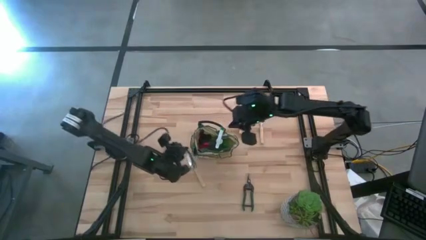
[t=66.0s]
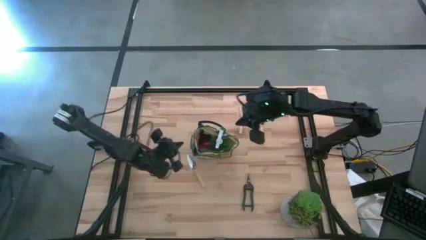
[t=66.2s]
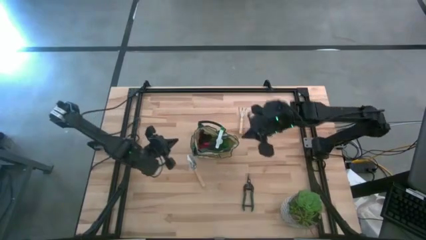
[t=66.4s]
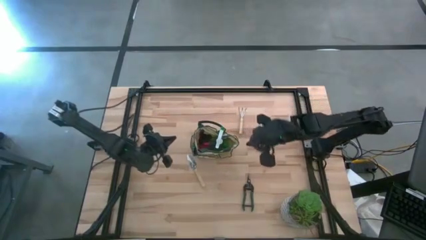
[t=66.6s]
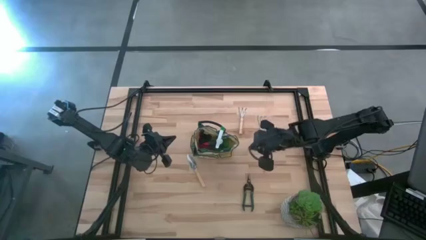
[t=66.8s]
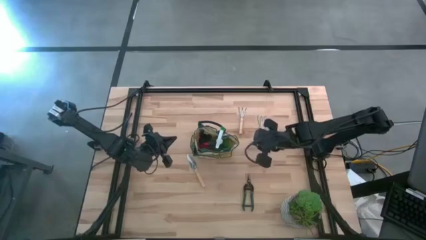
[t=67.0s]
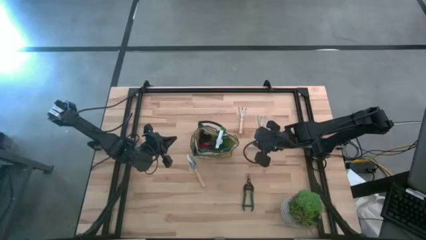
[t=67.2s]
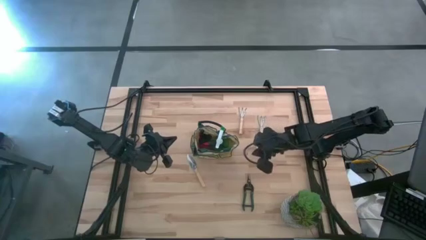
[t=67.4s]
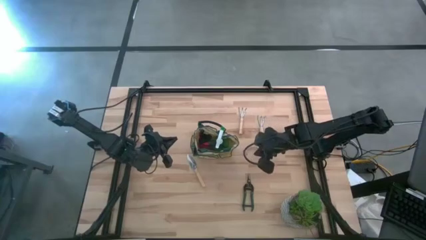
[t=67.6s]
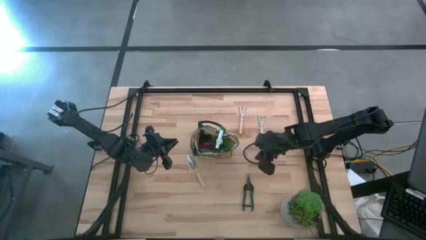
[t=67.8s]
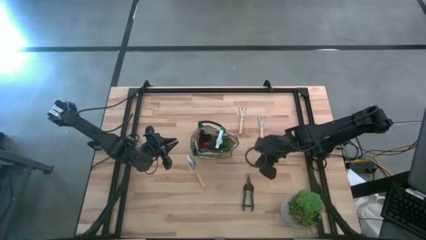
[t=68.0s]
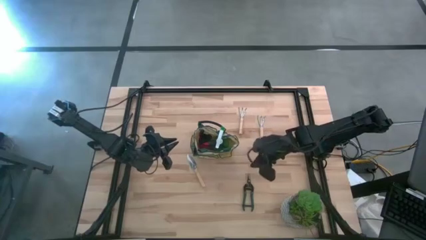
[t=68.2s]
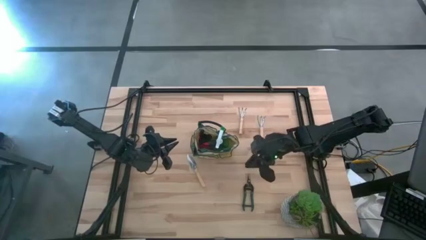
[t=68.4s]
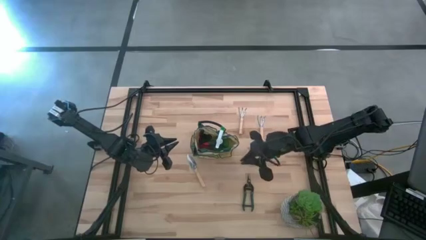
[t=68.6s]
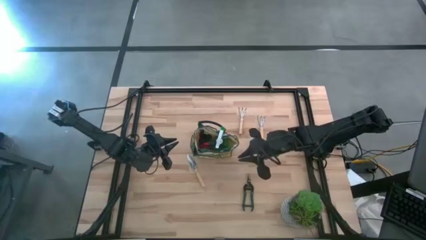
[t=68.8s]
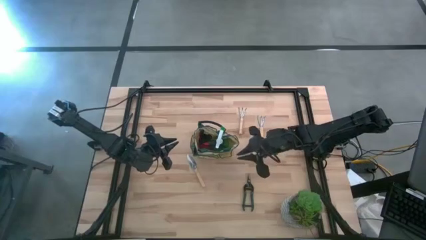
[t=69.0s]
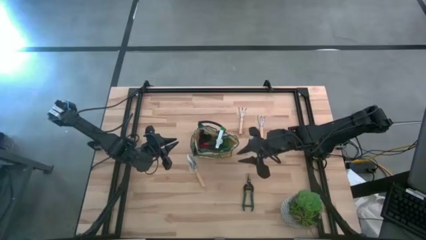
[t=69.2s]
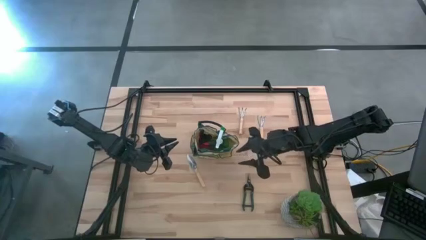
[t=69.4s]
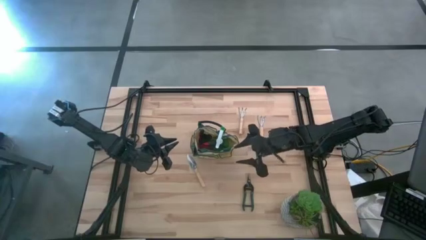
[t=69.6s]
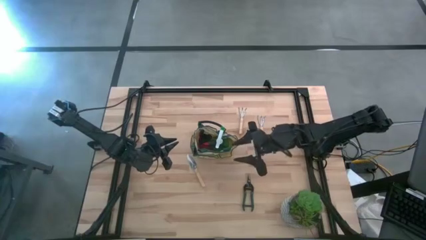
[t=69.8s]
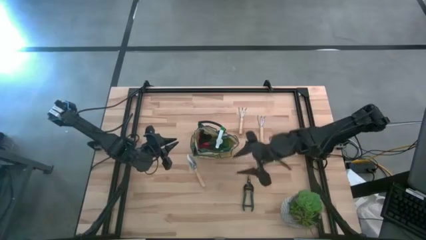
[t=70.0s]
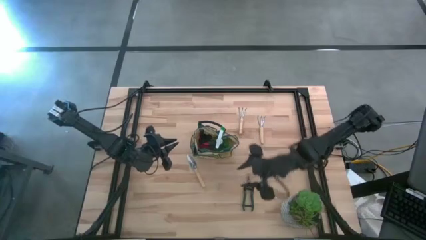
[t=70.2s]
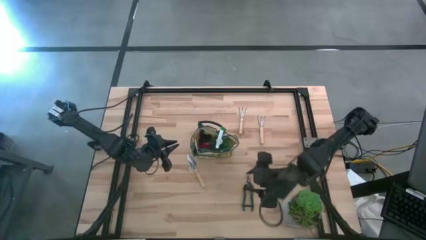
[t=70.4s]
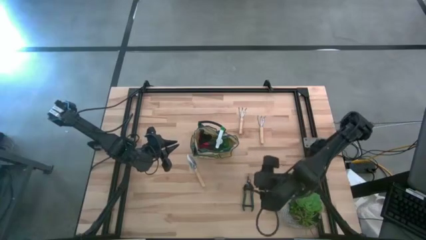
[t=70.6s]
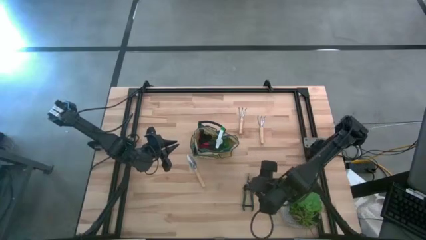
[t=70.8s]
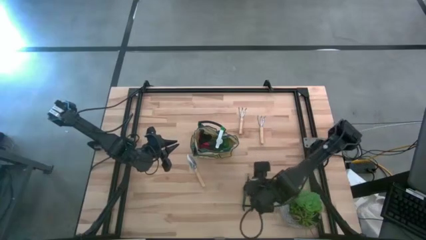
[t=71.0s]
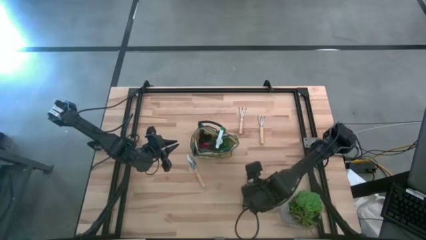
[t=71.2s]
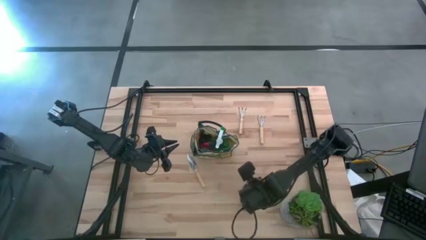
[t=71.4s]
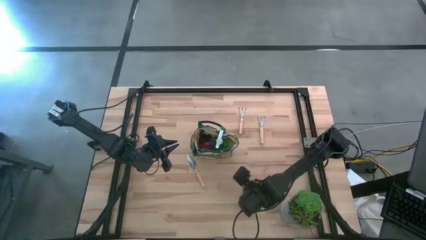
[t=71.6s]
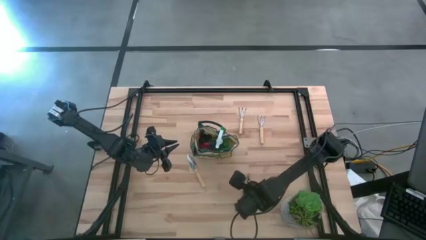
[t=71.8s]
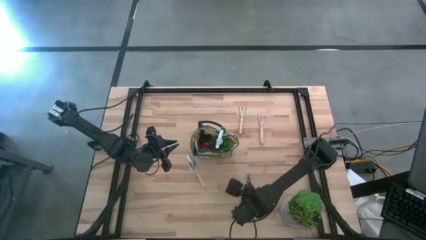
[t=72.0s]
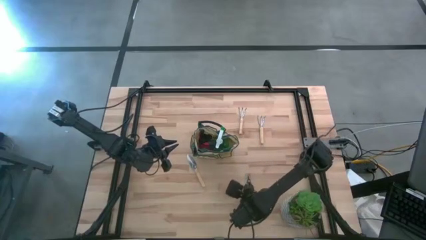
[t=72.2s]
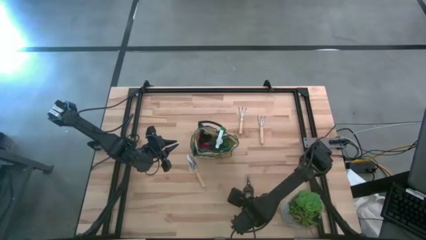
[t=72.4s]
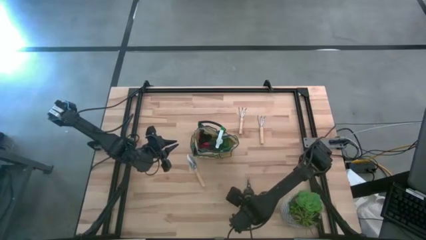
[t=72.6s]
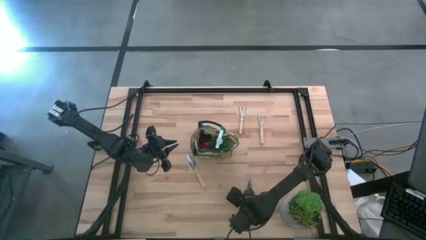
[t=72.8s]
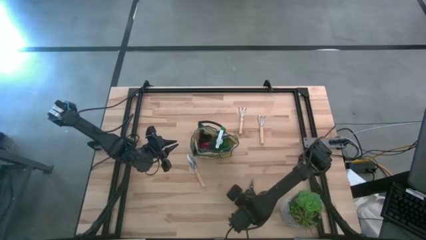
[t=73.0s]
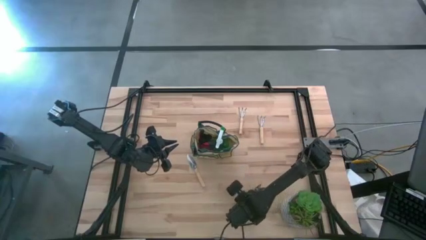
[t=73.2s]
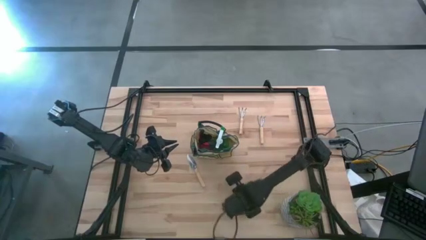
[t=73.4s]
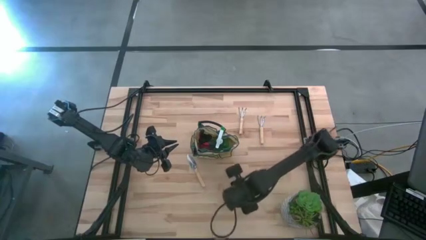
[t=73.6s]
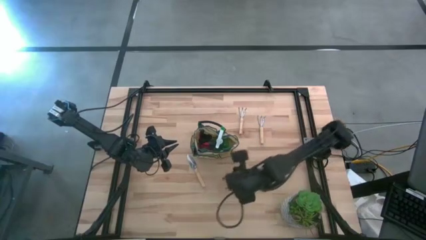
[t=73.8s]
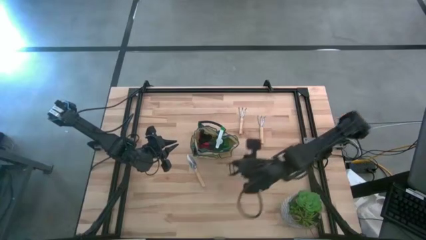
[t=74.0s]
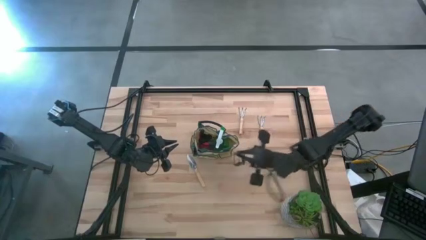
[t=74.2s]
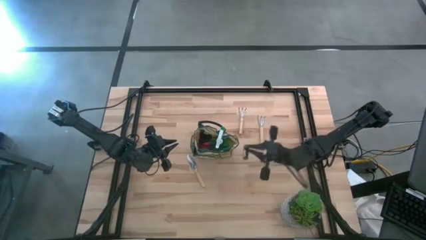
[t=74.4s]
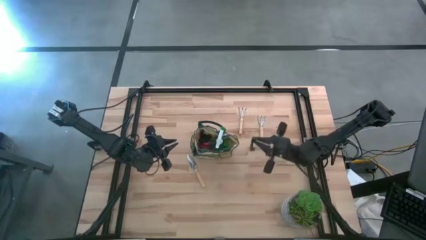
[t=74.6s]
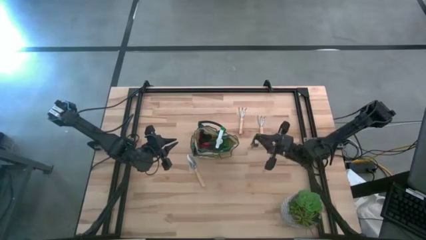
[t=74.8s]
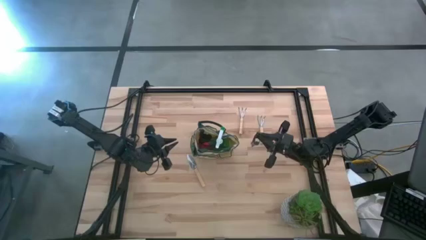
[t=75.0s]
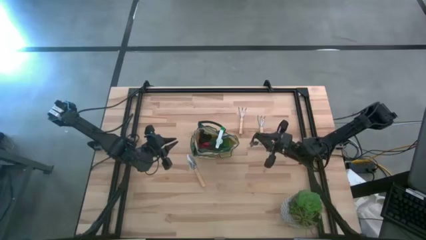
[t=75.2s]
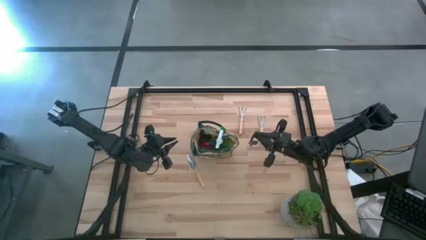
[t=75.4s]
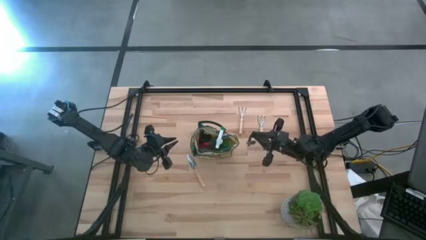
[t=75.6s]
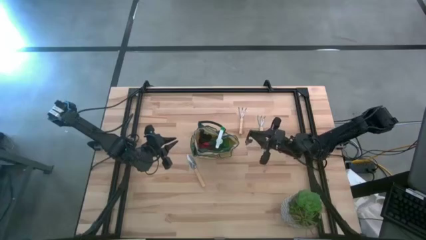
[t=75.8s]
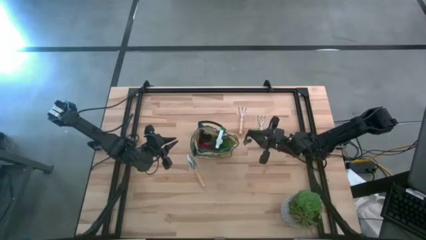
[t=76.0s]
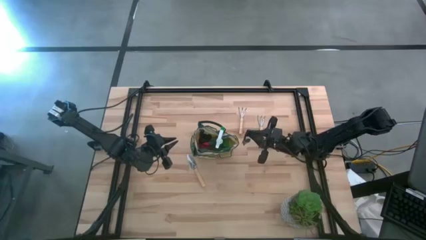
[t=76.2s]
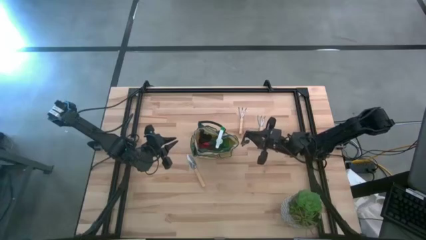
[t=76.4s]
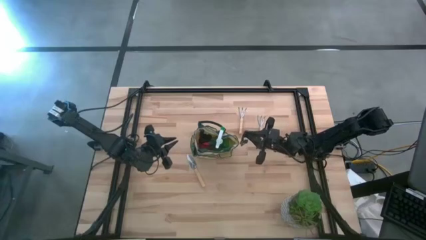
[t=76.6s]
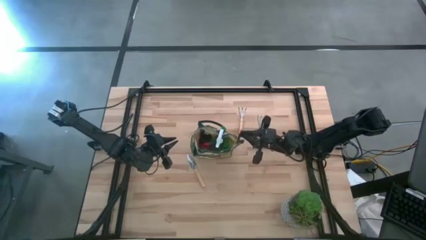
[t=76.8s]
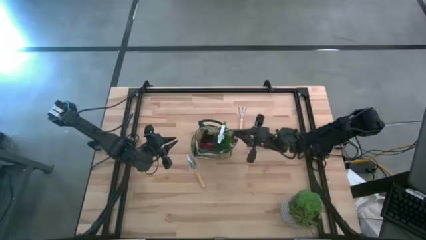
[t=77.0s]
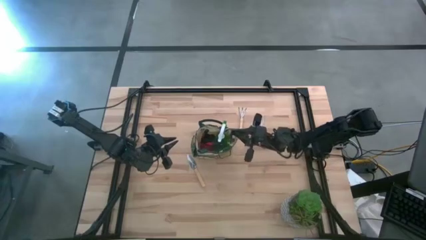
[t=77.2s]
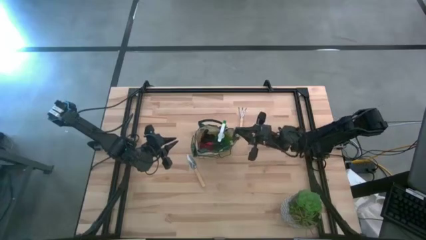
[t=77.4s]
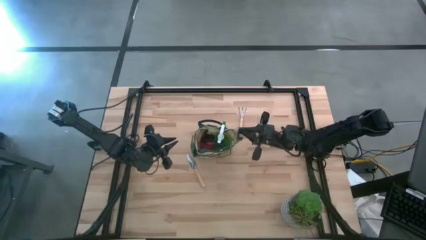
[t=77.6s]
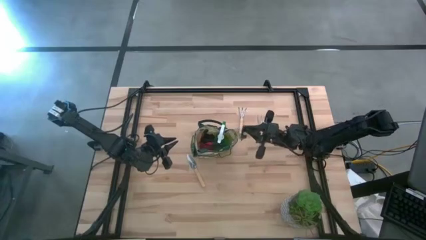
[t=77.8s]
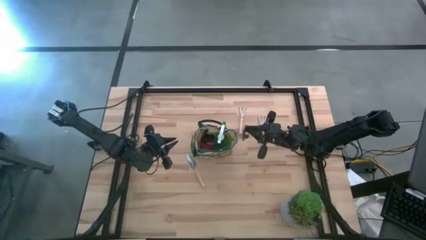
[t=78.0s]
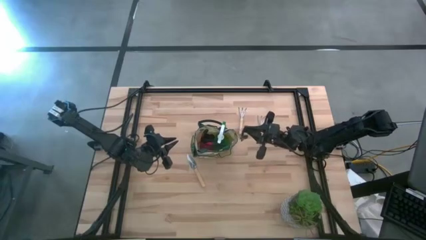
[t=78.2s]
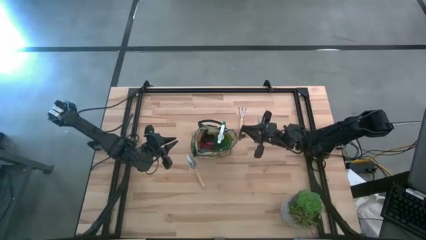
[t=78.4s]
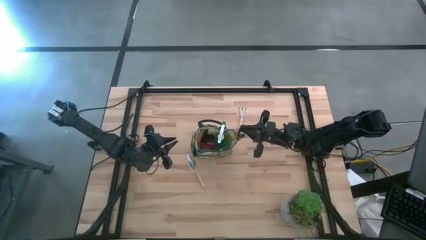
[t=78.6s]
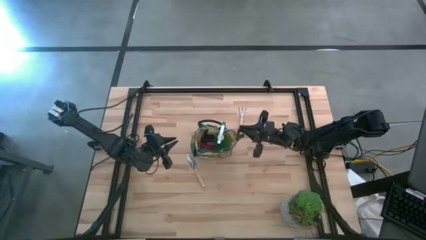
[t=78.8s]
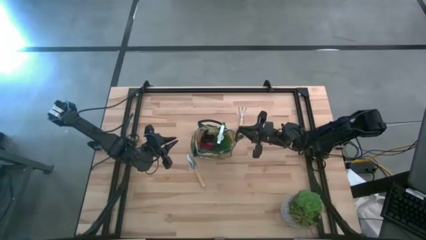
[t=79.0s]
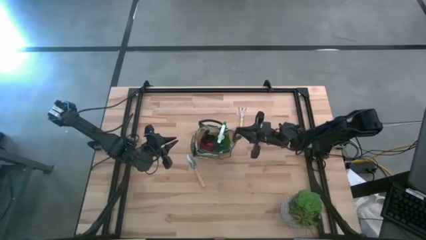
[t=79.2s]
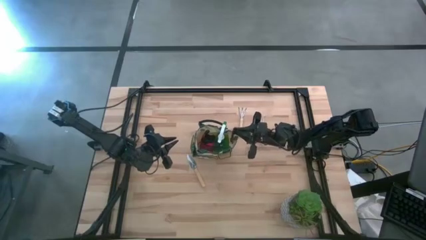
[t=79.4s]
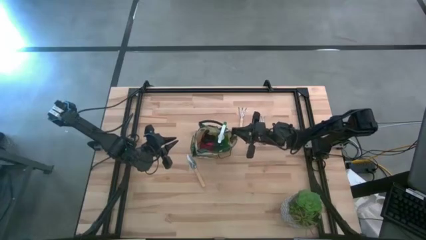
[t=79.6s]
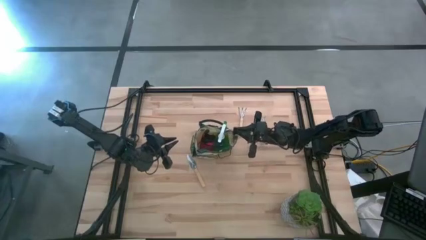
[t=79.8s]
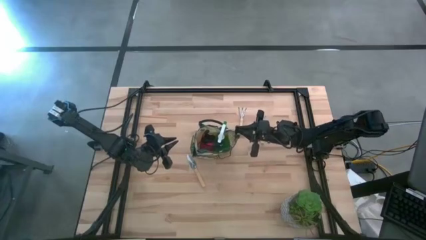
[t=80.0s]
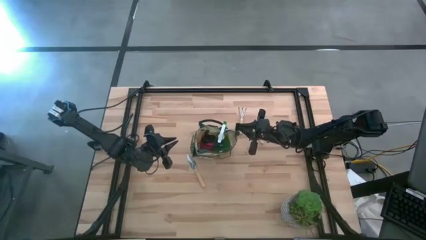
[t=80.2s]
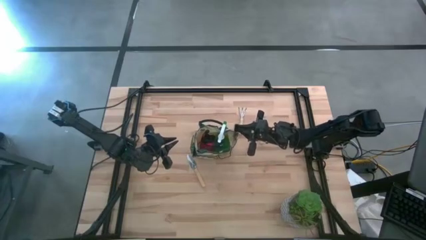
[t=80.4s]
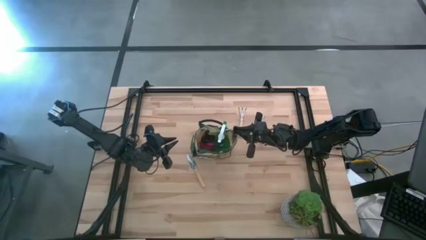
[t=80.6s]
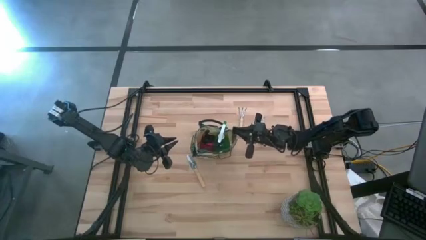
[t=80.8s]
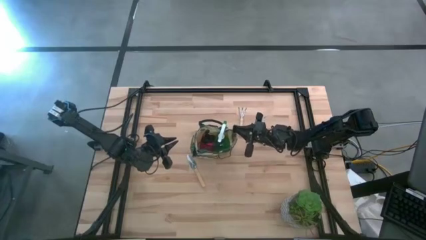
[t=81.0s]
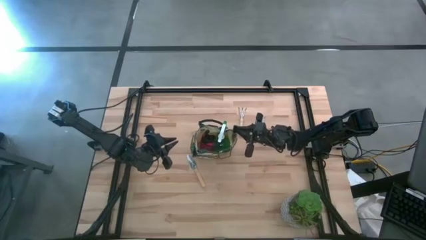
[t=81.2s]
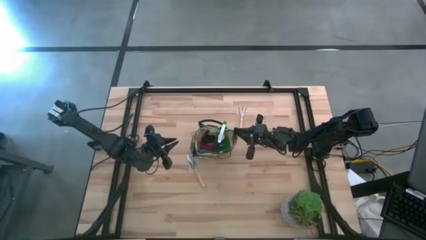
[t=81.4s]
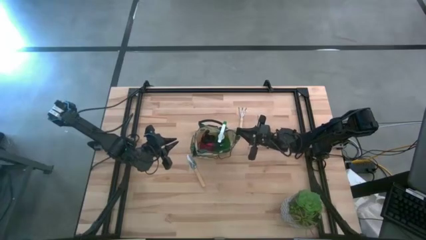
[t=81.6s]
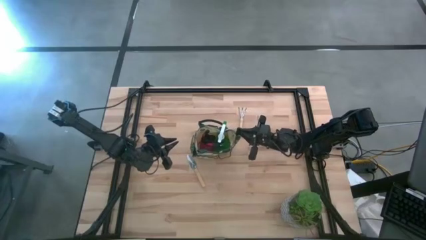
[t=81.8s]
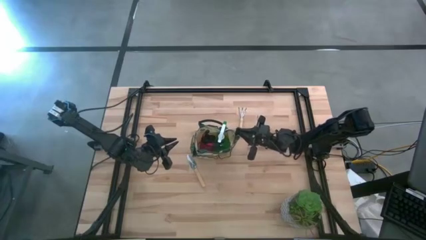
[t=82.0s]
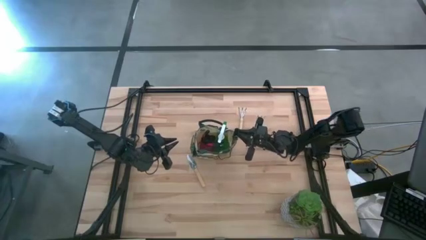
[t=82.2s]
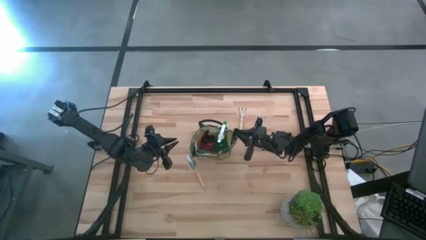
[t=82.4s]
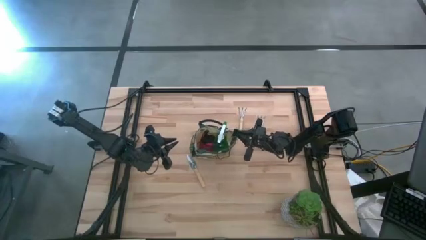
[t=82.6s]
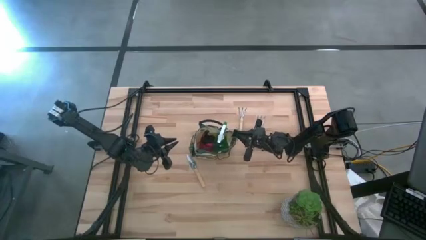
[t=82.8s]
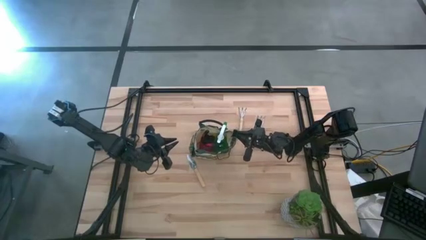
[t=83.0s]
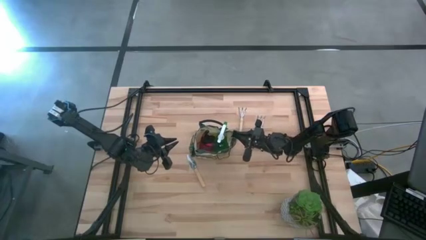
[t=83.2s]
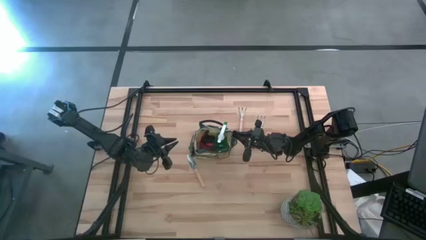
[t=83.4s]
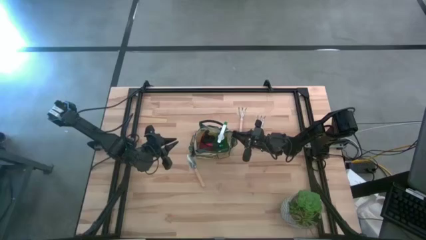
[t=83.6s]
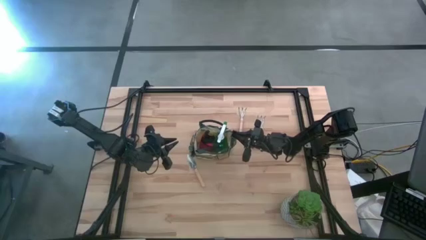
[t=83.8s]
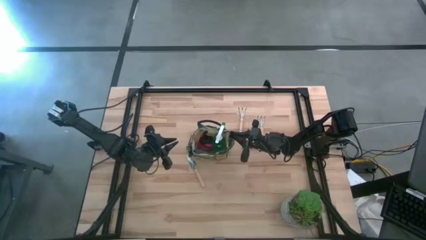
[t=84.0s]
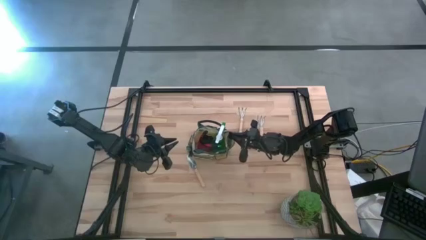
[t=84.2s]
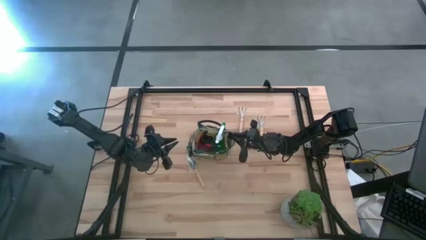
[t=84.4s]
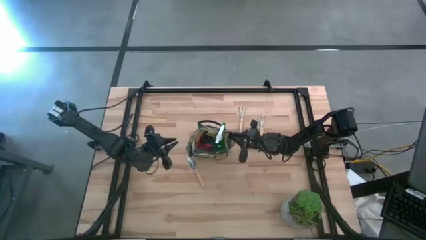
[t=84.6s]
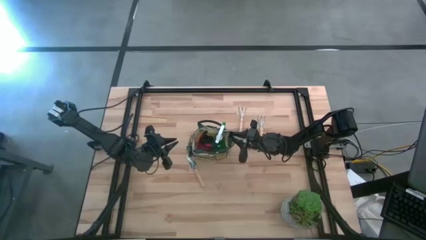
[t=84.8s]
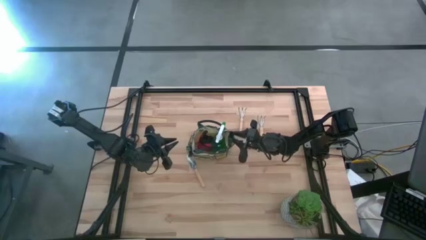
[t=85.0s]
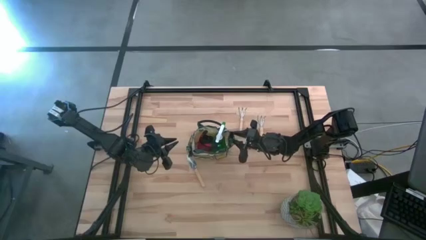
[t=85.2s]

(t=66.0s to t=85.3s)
Task: Pick & Place Garden tools in Gardening bag
Put the green shear scissors into the white gardening bag
